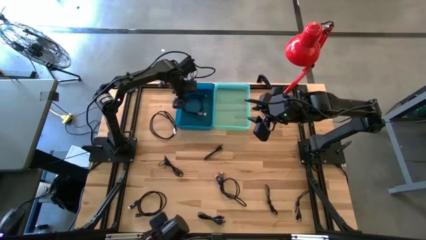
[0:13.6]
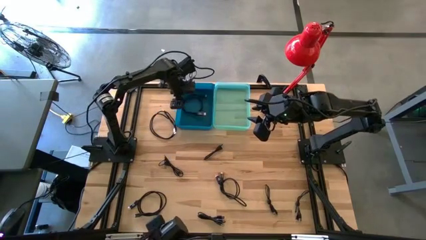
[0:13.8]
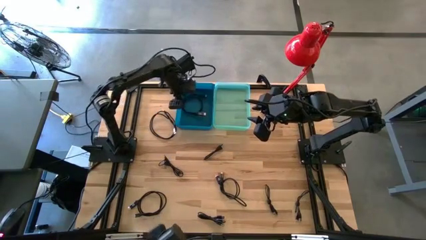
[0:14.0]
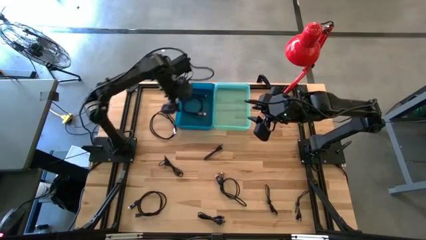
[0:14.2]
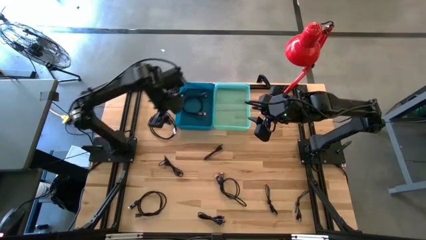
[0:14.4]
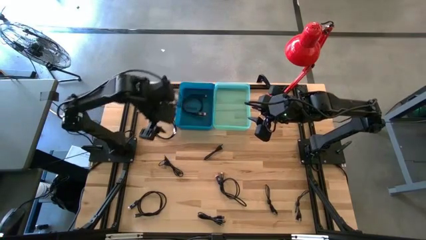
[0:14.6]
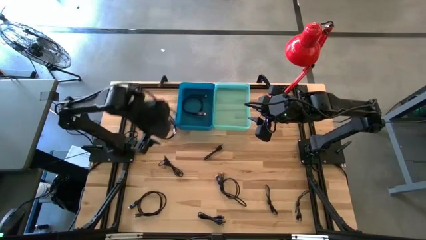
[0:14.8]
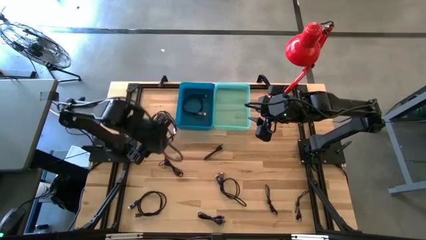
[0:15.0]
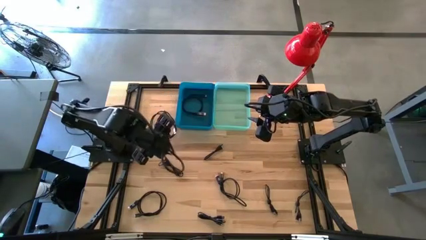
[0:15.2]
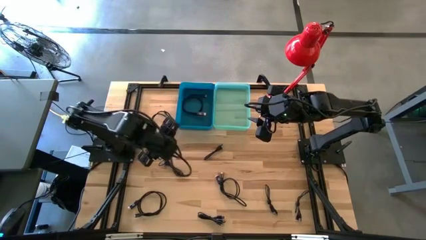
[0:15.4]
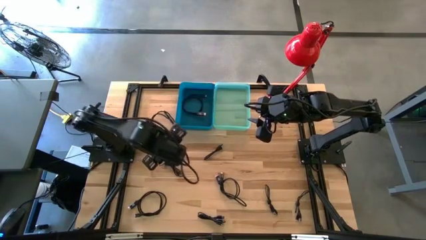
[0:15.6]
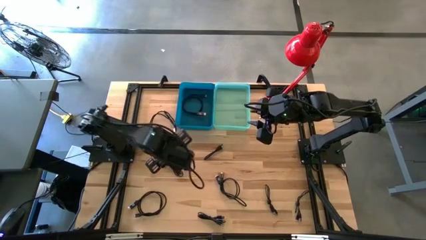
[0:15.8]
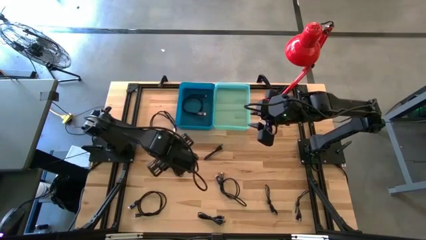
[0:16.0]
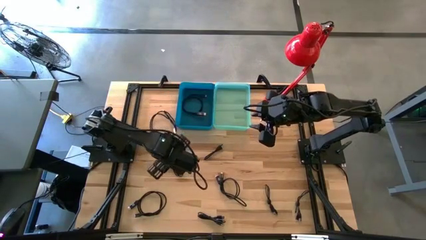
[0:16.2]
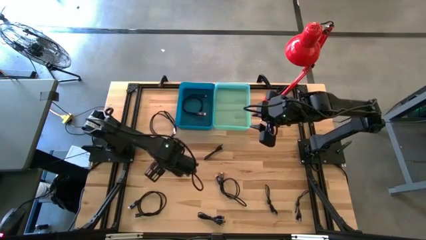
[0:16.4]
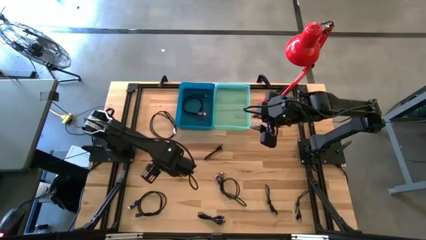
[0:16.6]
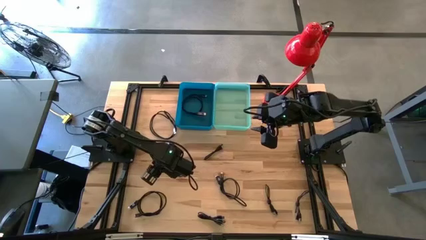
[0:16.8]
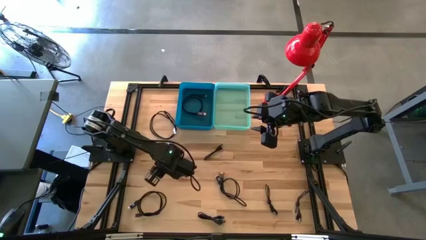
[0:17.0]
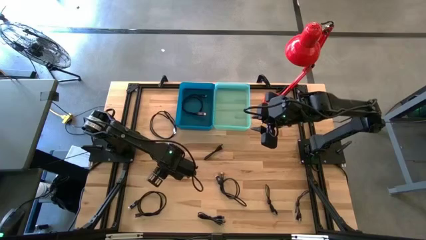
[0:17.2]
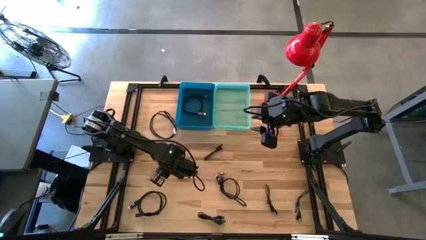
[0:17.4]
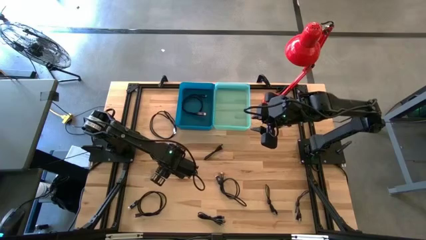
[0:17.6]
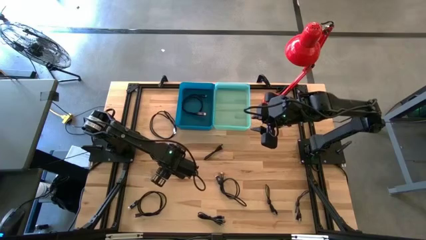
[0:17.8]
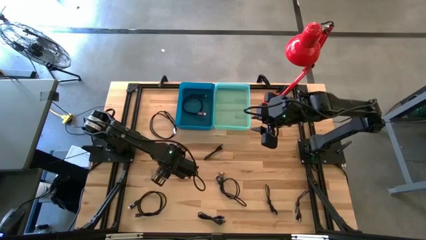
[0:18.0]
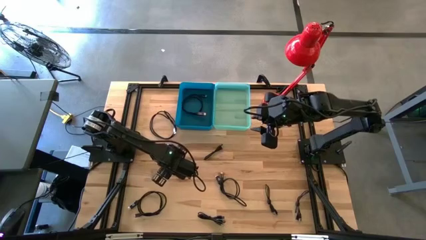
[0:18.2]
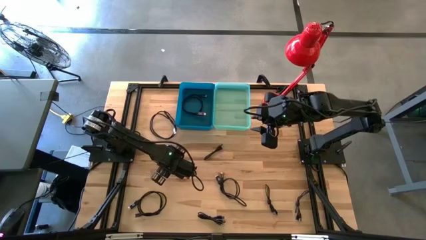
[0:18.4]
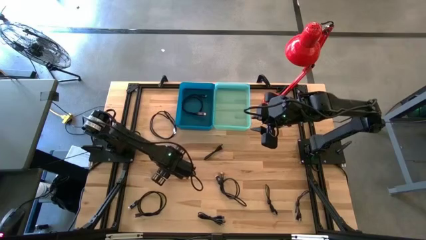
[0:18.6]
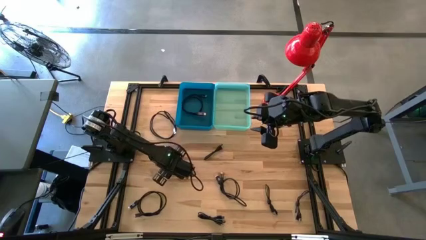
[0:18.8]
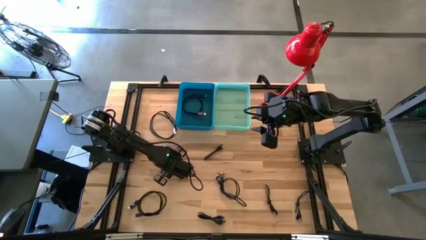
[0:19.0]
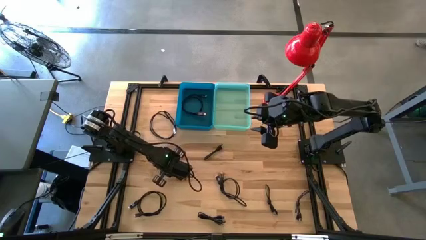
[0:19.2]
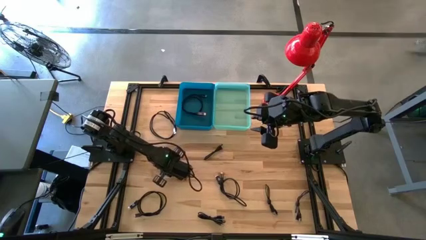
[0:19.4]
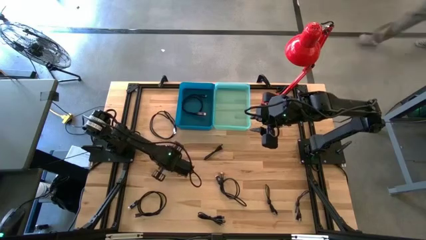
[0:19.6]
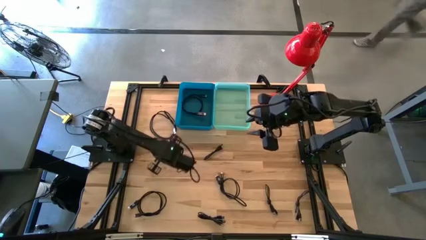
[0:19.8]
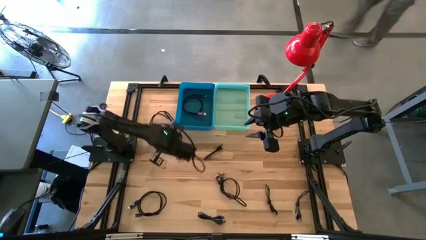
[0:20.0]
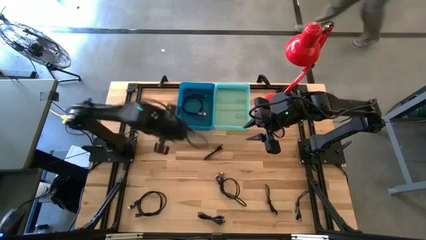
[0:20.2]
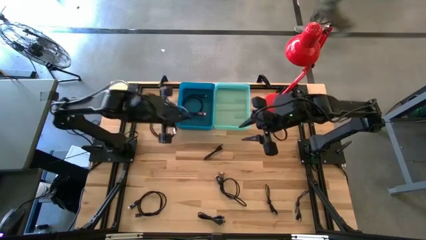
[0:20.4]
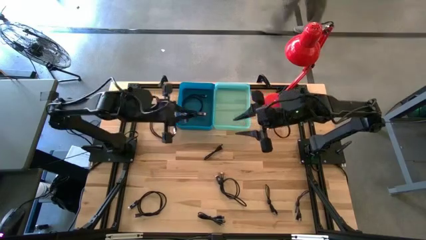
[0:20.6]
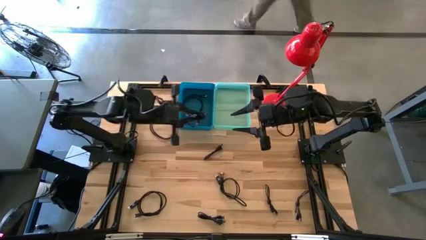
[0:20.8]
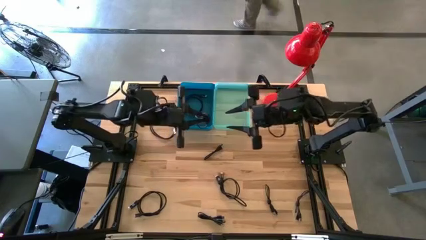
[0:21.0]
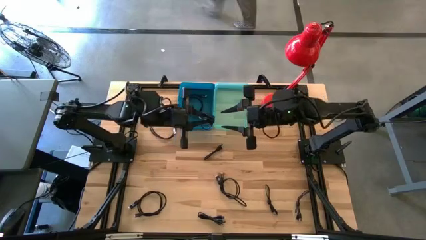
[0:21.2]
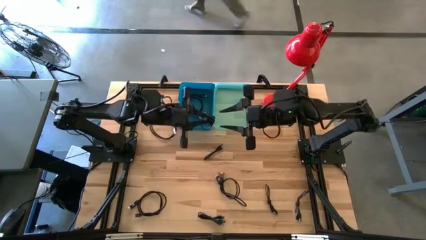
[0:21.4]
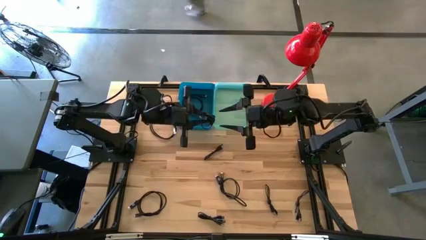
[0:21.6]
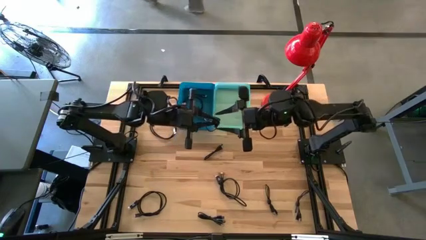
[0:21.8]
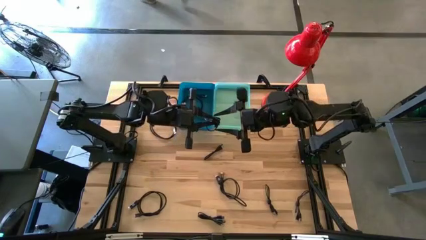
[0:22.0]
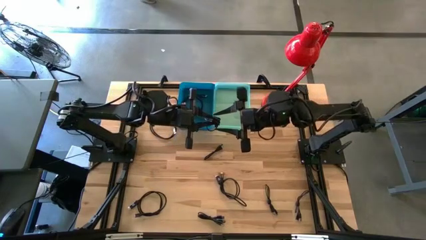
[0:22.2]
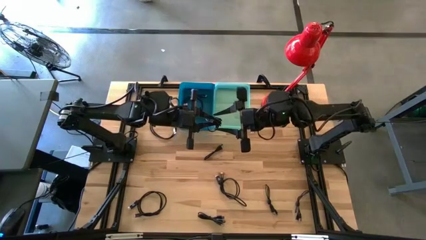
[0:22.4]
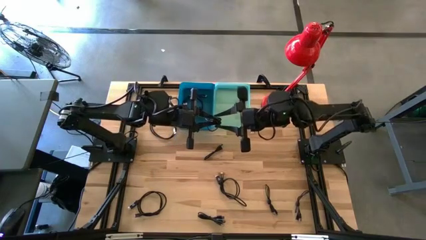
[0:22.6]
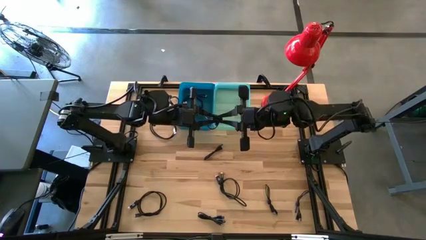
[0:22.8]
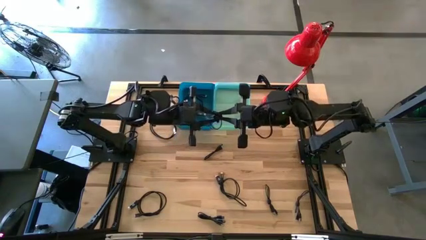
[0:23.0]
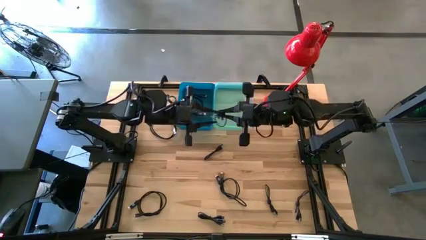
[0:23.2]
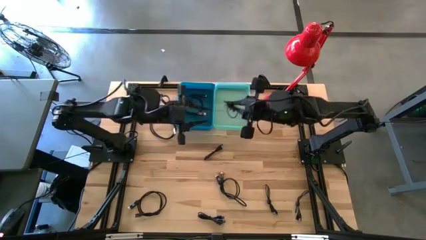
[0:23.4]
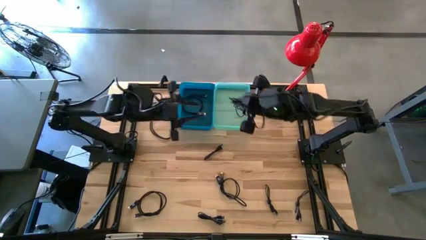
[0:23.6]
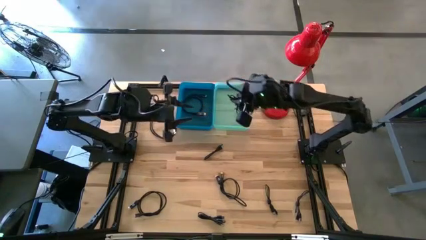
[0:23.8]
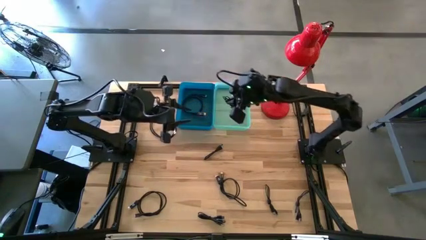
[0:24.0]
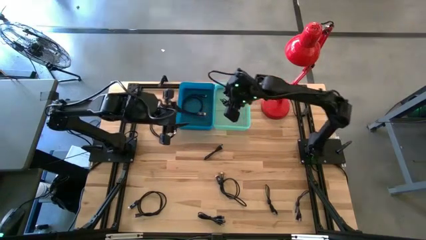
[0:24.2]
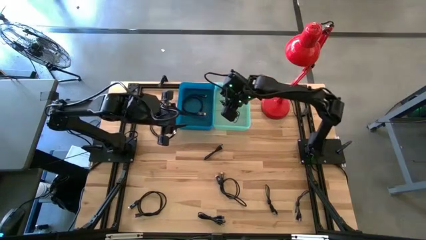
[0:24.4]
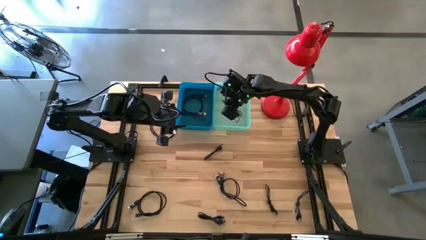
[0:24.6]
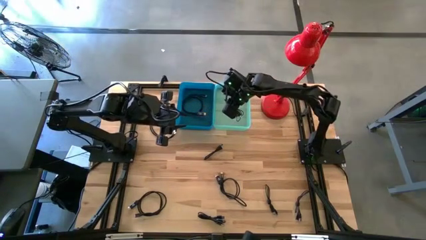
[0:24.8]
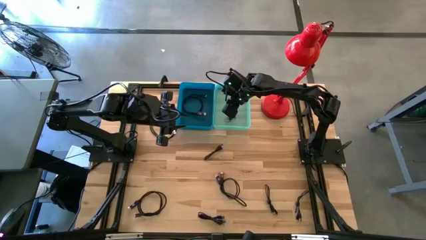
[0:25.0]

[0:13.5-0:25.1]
Task: Pick & Place USB Port
Put the black usb cable into the light blue bin

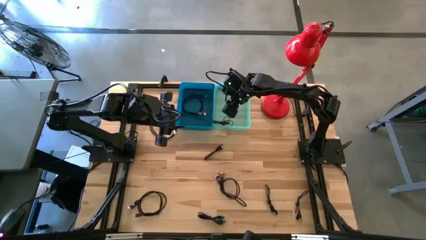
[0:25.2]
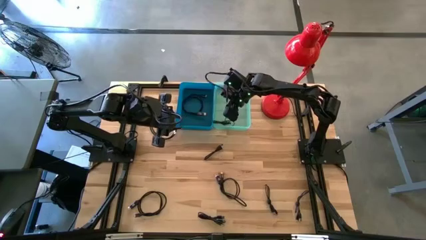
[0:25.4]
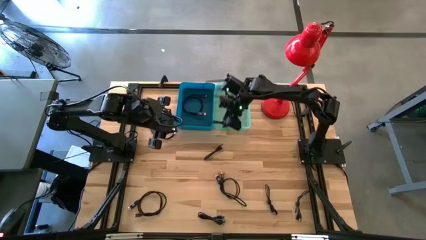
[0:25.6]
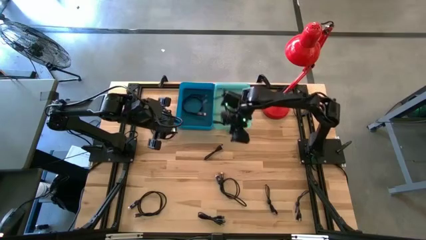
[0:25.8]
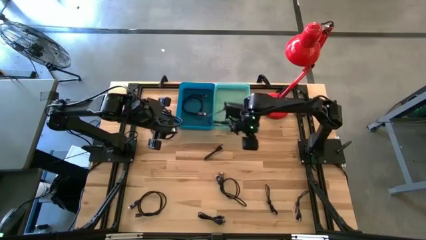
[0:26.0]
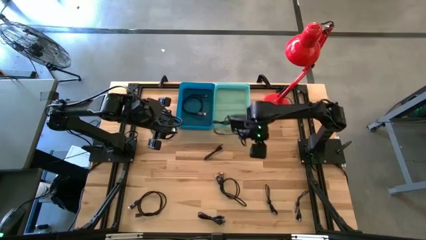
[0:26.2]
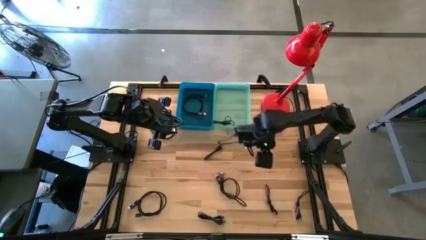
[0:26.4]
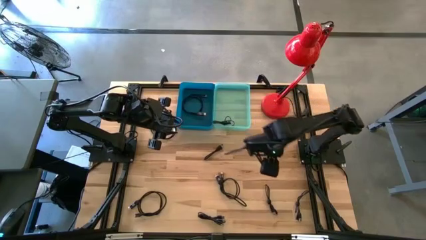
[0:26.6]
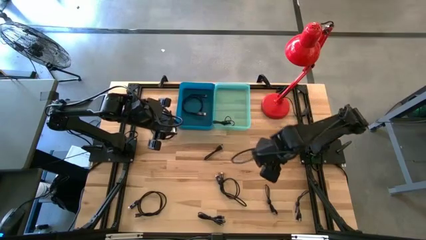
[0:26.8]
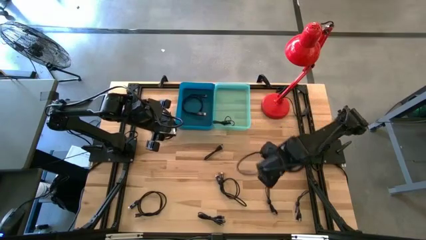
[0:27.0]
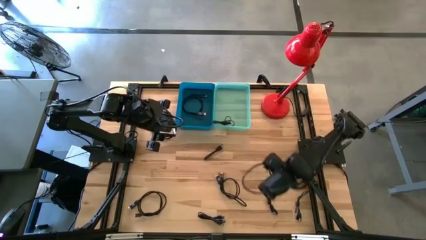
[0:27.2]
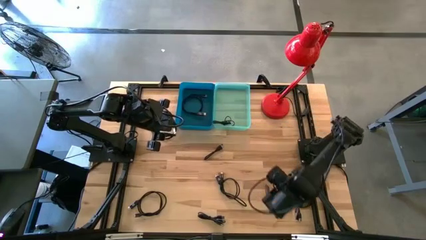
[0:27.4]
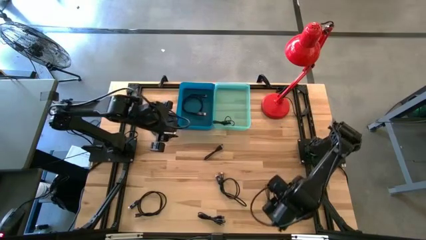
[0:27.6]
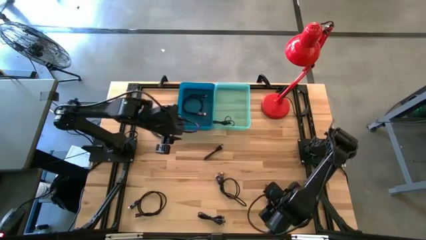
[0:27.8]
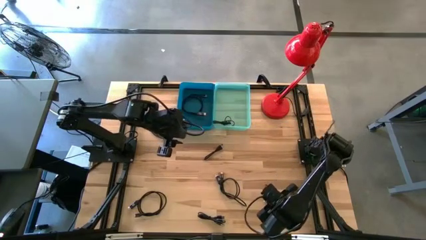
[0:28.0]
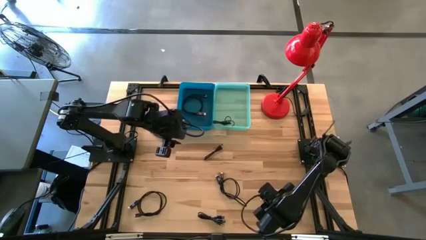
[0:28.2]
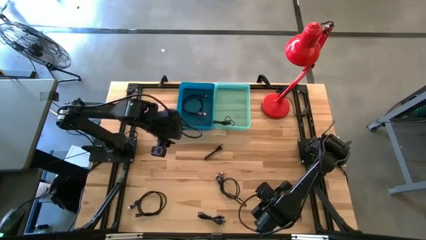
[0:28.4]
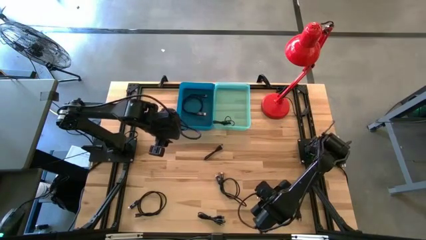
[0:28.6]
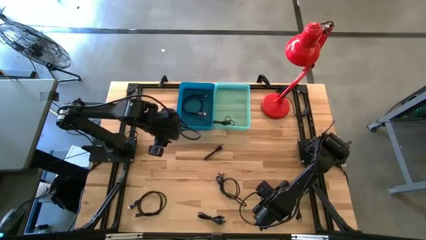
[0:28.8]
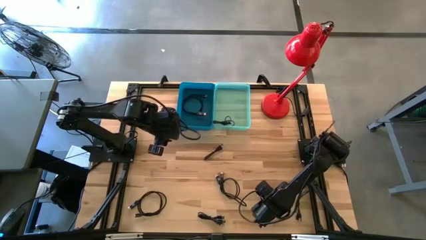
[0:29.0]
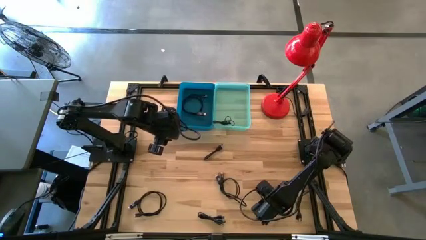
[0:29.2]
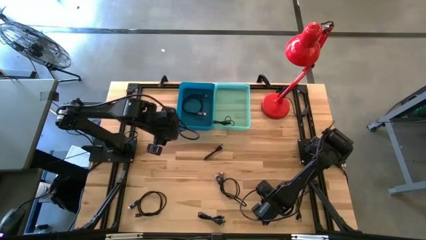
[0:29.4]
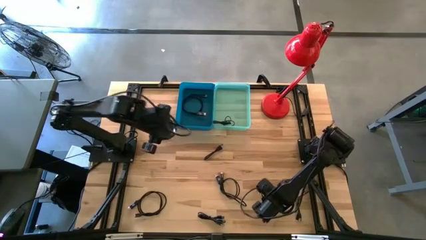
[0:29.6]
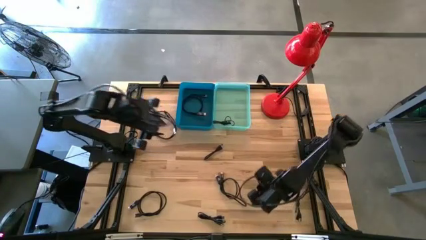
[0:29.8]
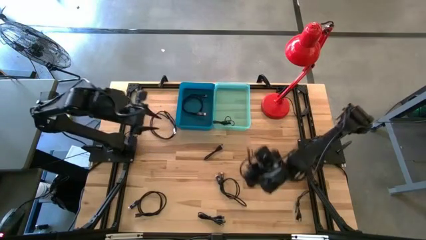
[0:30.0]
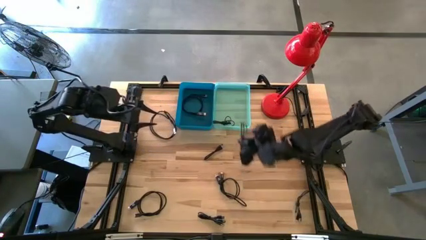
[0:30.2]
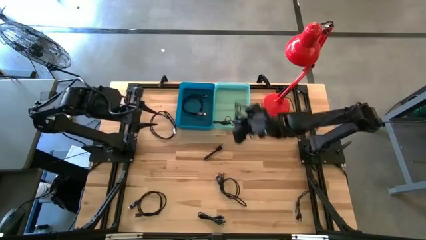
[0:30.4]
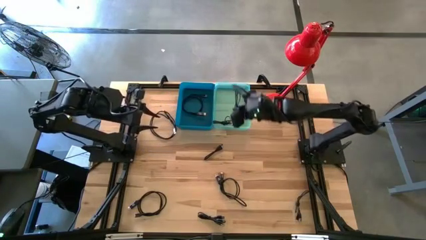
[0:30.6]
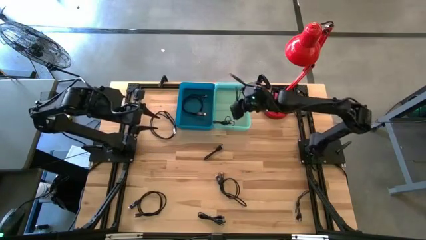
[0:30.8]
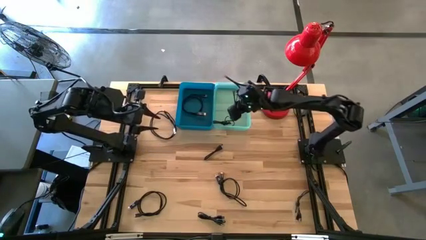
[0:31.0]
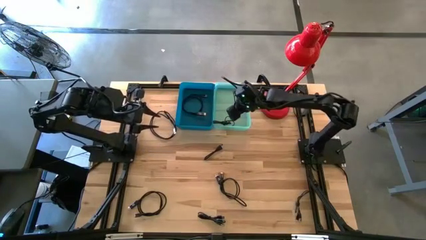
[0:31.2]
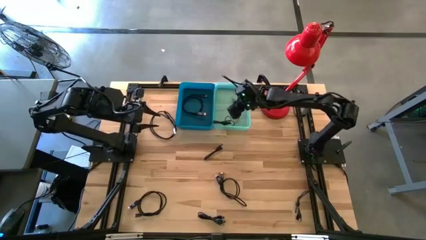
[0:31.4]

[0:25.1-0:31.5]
Put the black usb cable into the light blue bin
